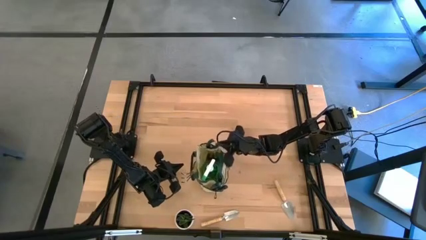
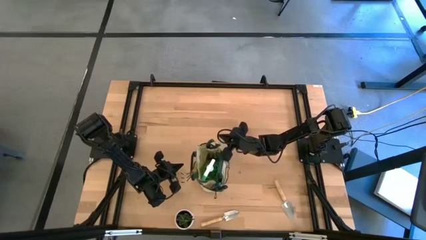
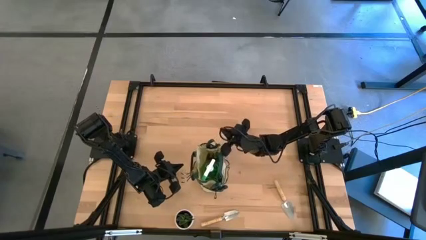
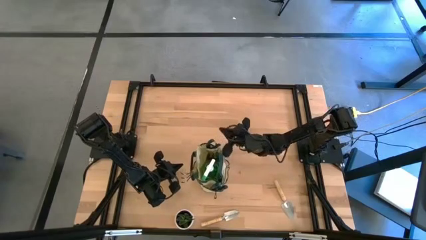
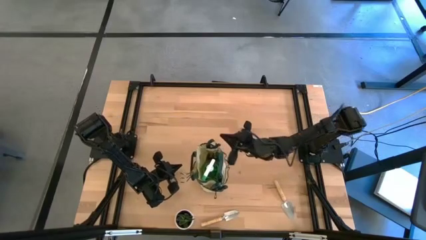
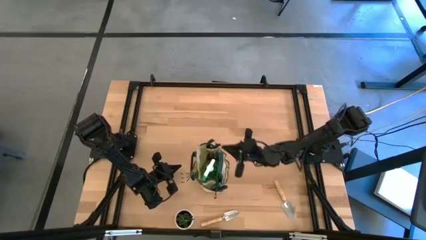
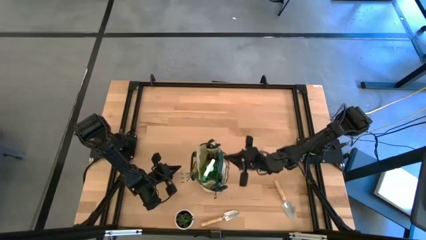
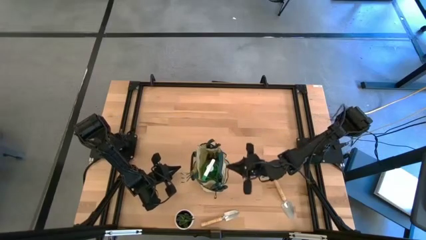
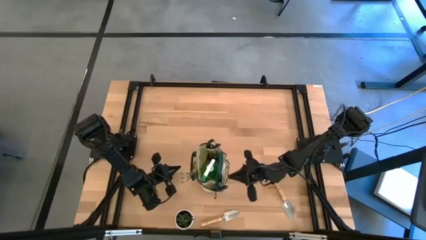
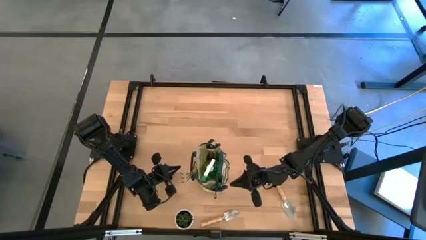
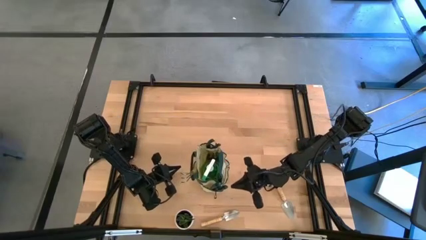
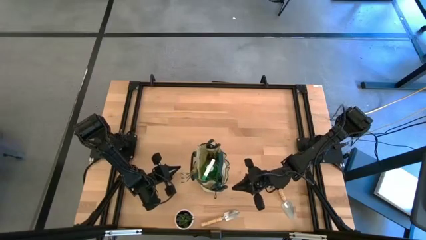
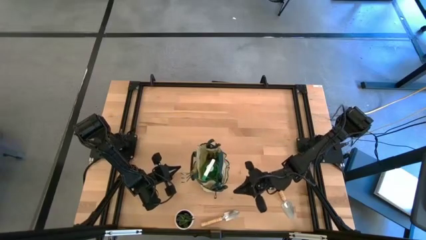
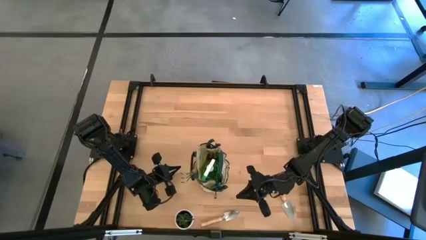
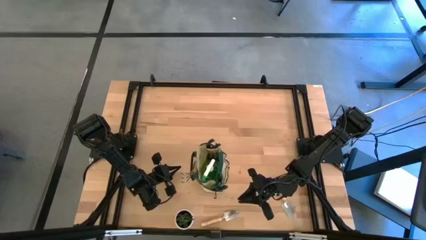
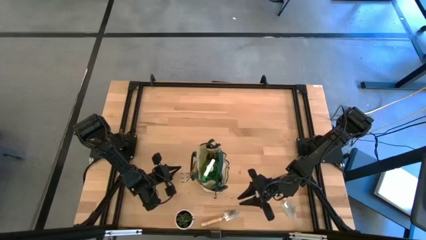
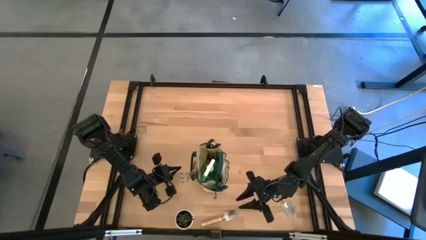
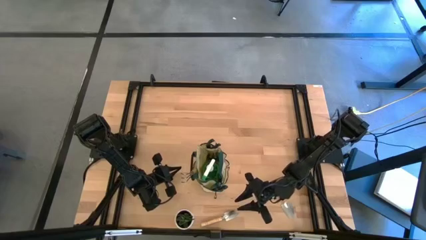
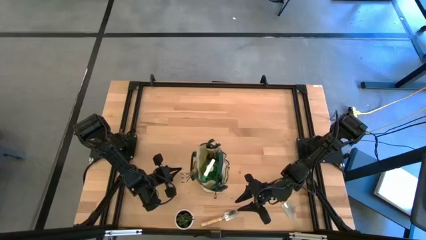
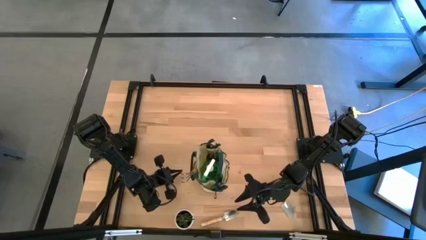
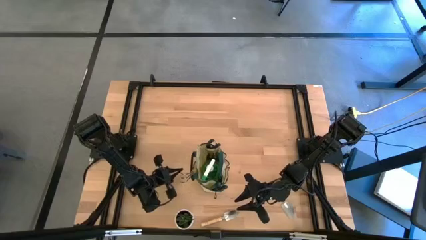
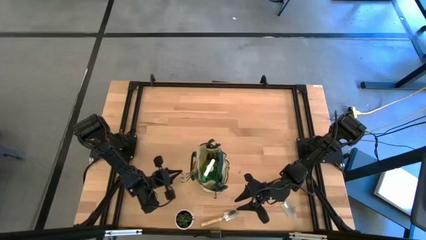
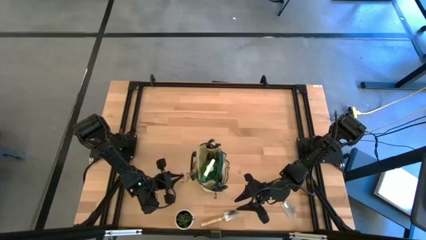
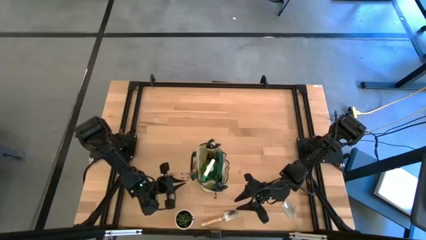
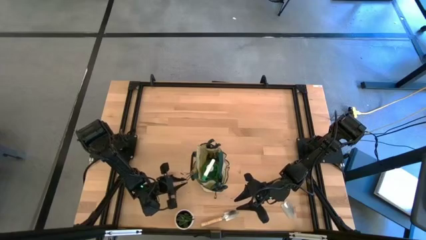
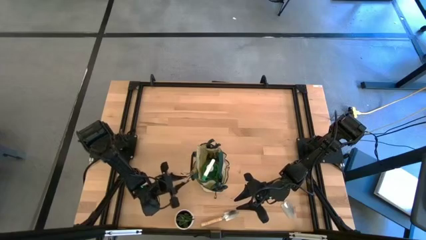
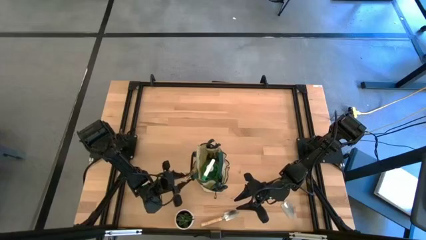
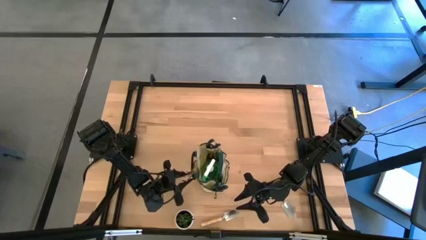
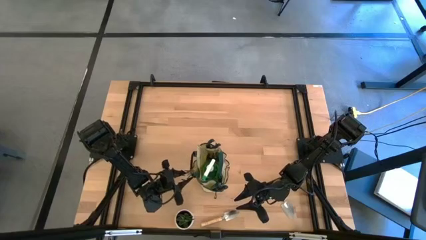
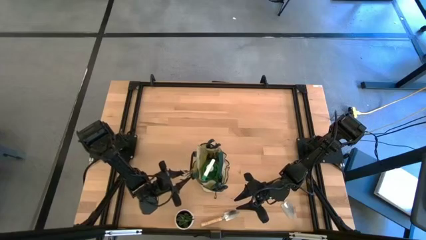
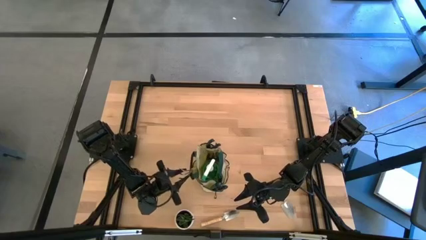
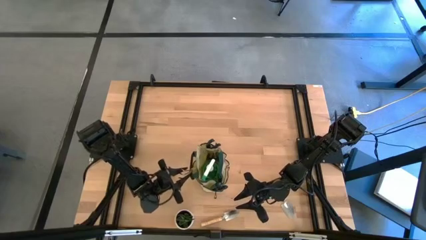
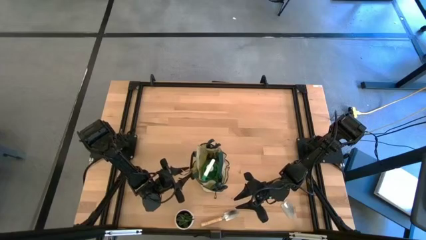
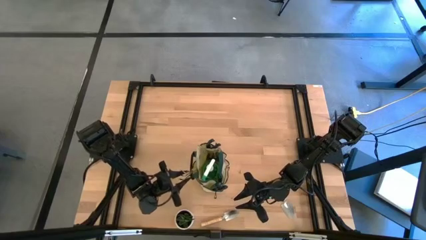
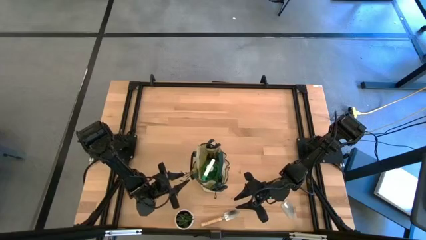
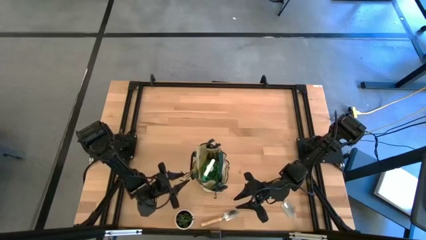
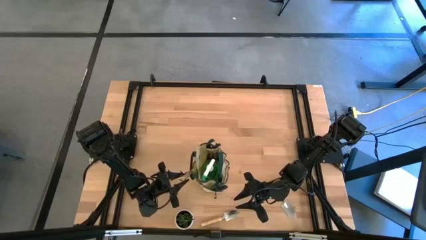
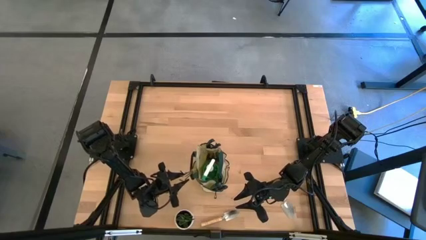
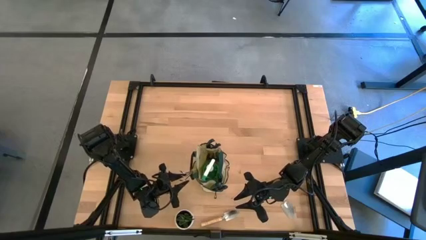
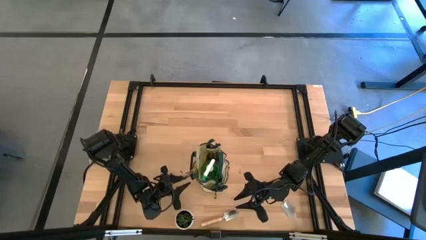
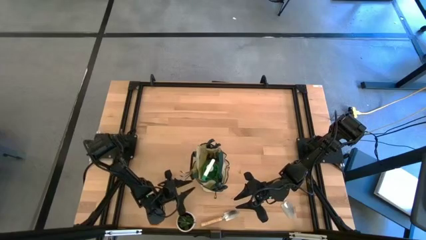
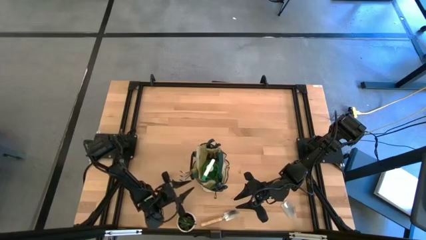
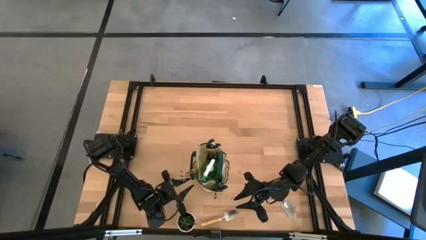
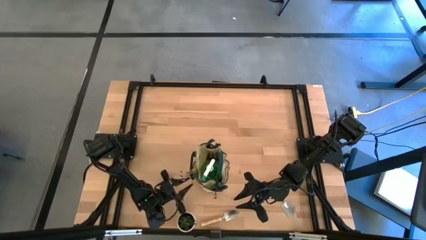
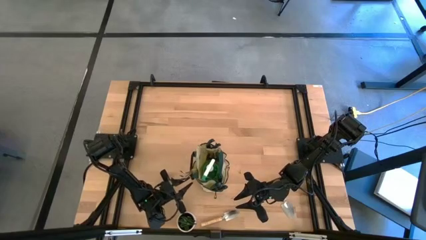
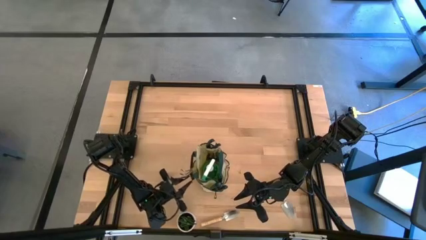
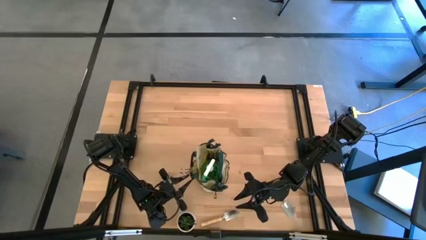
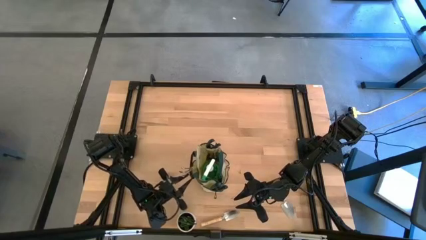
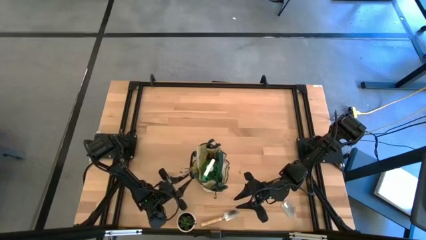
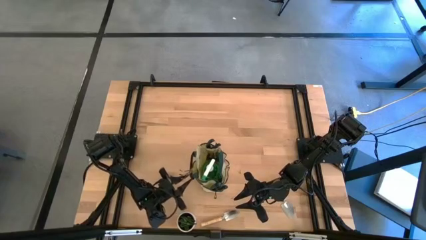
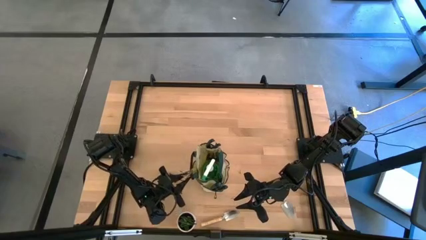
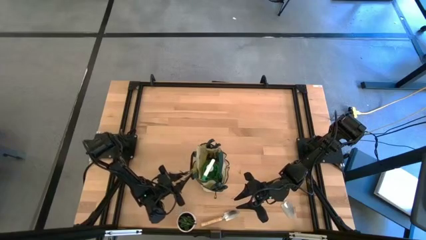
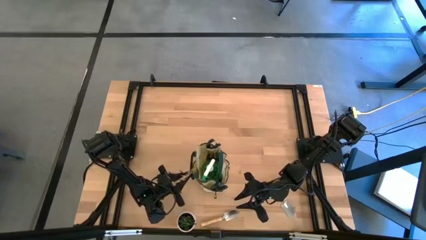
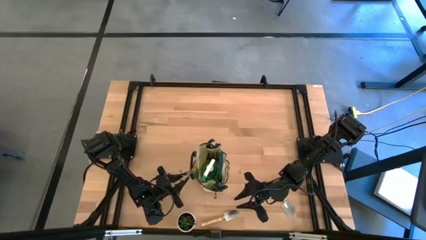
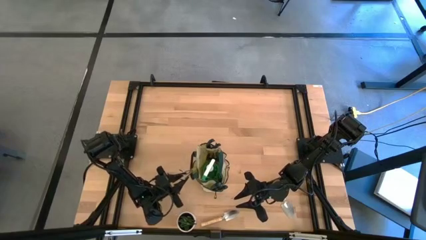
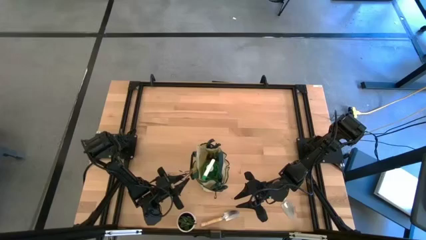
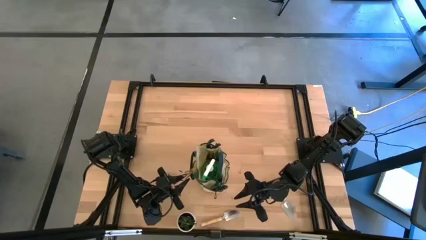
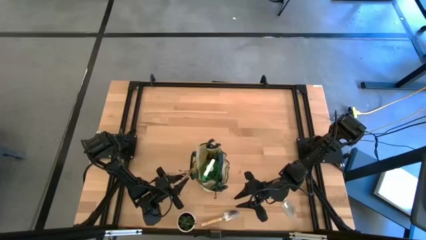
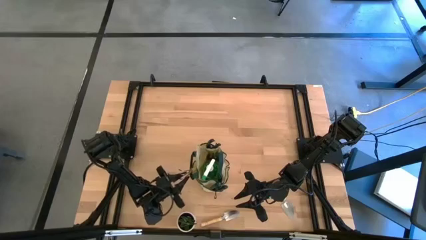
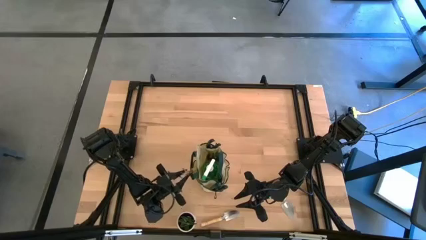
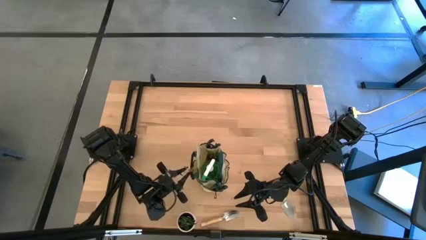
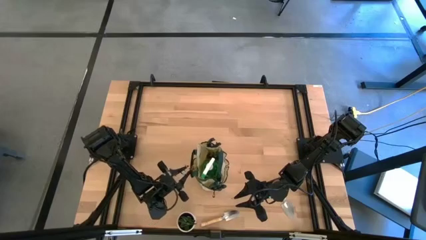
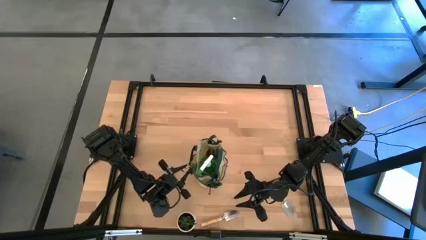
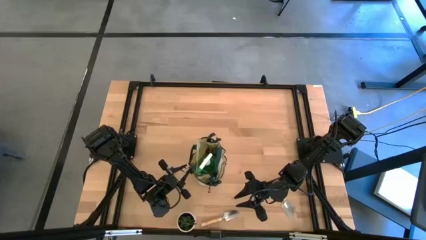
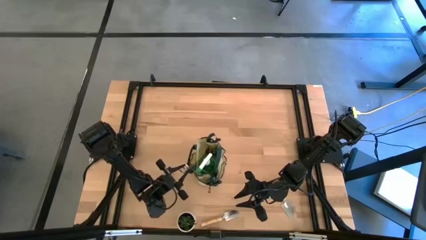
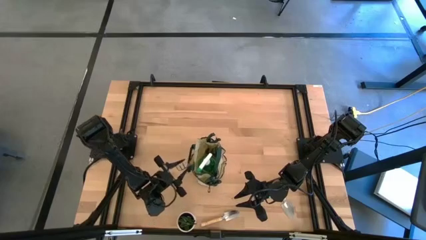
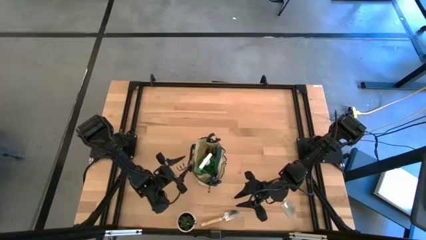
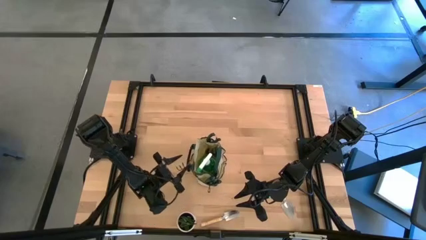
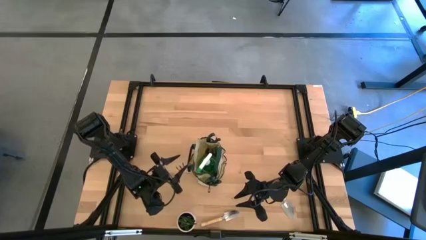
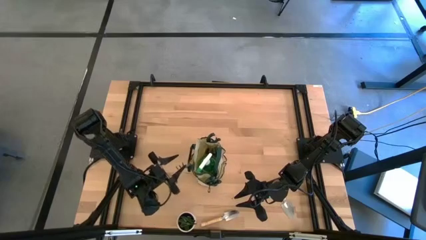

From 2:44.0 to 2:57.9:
Task: Pick & Place Garden tools in Gardening bag
Adjust the brown hand rake in the side pocket of the green gardening bag
